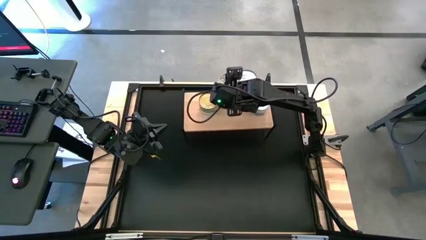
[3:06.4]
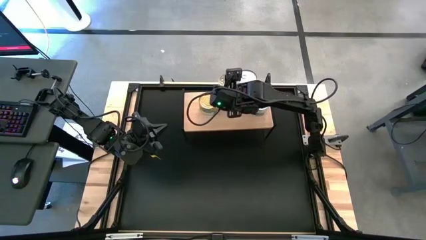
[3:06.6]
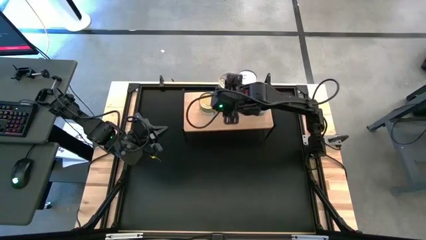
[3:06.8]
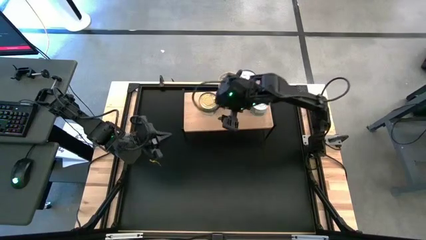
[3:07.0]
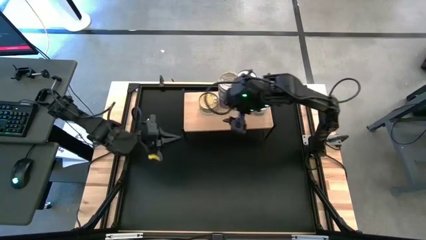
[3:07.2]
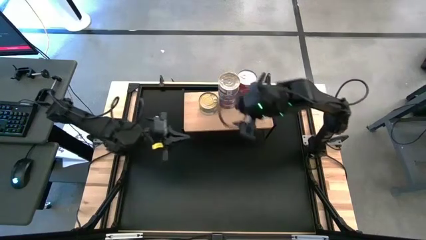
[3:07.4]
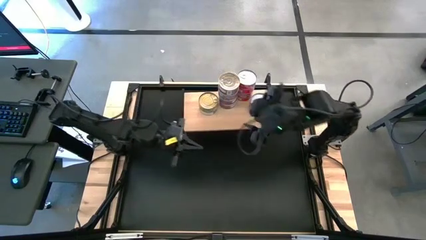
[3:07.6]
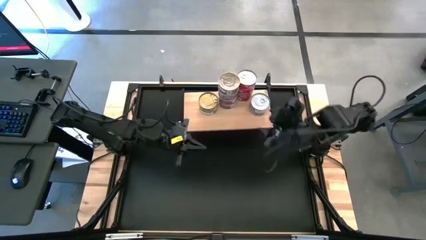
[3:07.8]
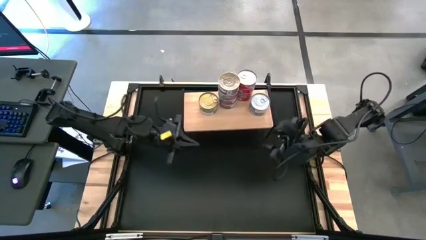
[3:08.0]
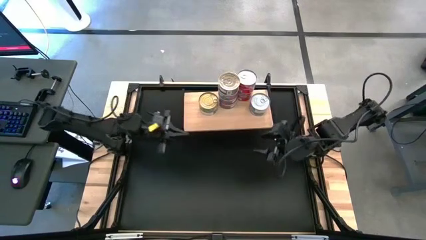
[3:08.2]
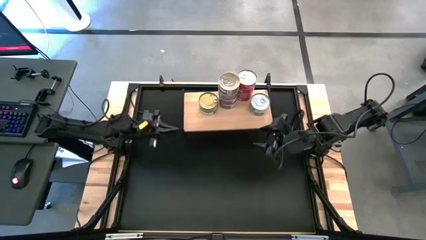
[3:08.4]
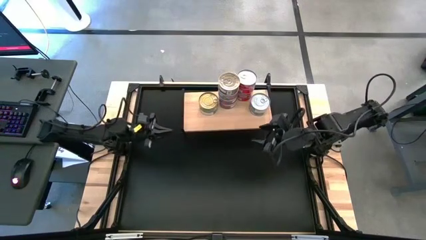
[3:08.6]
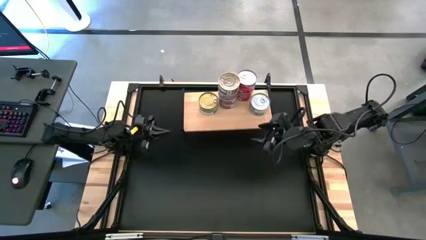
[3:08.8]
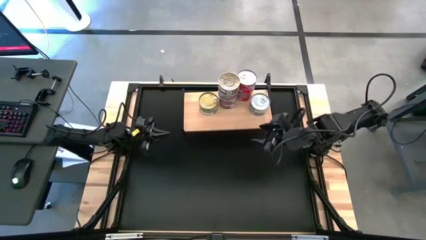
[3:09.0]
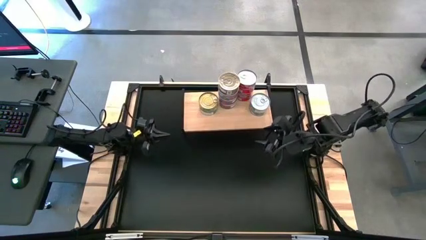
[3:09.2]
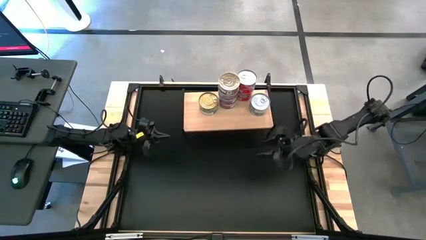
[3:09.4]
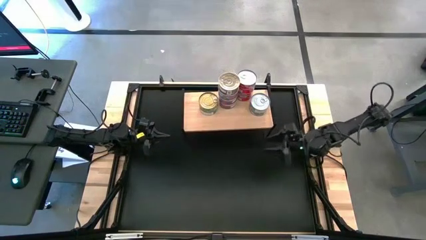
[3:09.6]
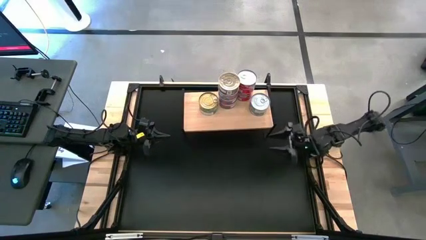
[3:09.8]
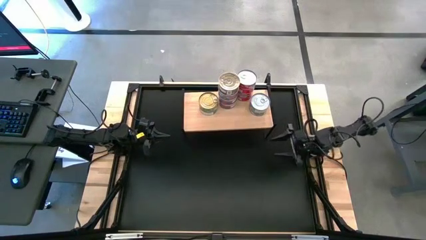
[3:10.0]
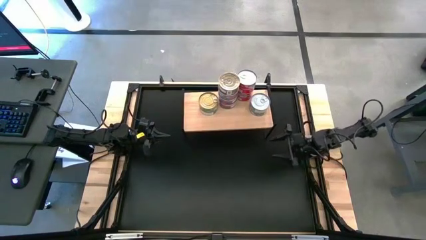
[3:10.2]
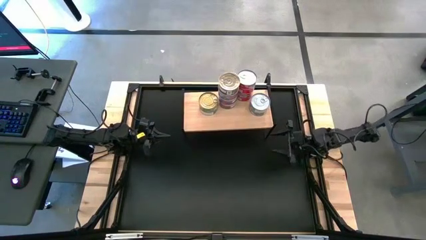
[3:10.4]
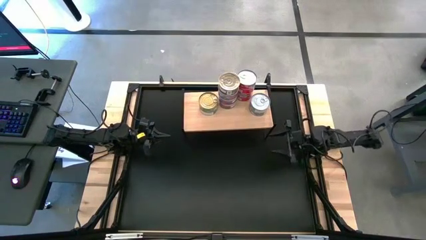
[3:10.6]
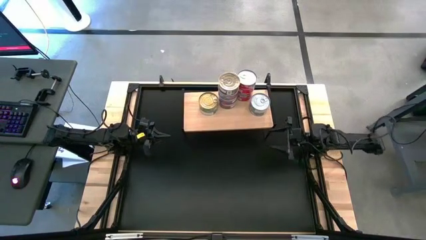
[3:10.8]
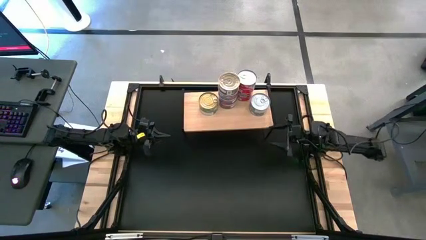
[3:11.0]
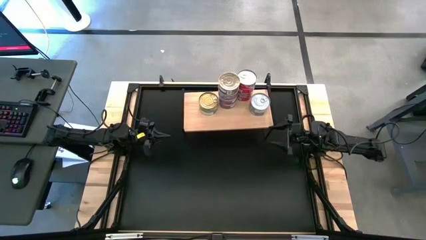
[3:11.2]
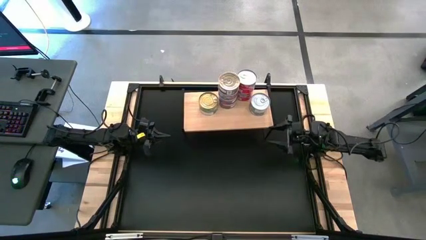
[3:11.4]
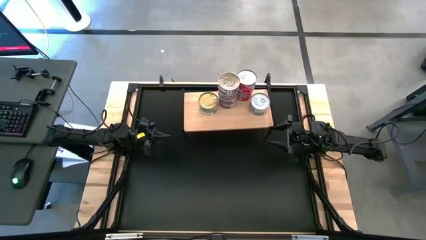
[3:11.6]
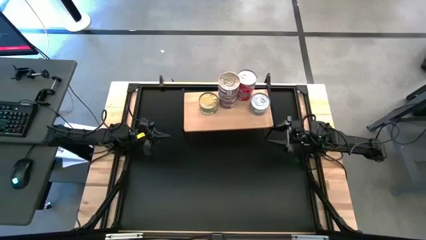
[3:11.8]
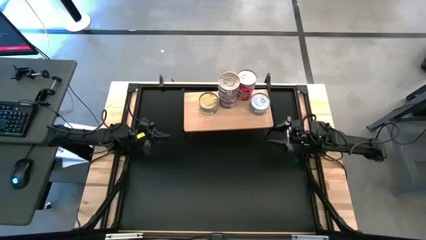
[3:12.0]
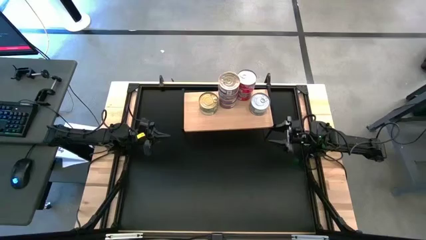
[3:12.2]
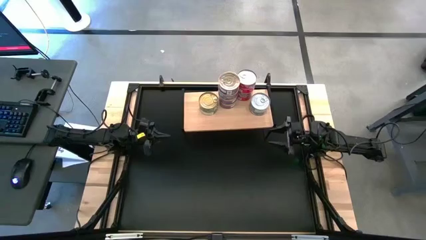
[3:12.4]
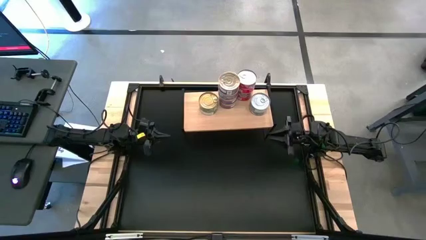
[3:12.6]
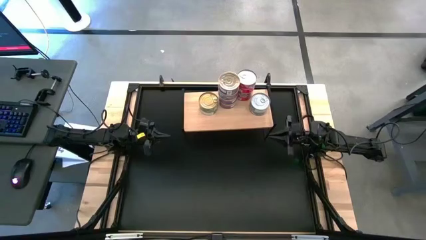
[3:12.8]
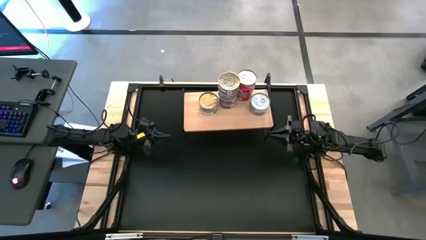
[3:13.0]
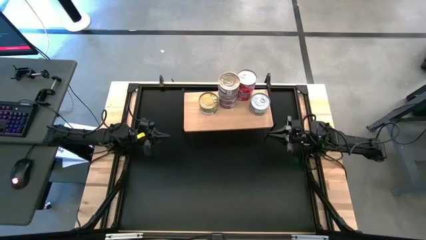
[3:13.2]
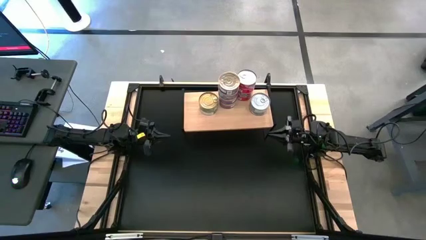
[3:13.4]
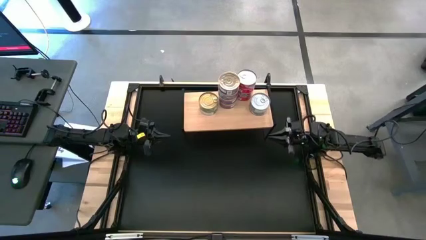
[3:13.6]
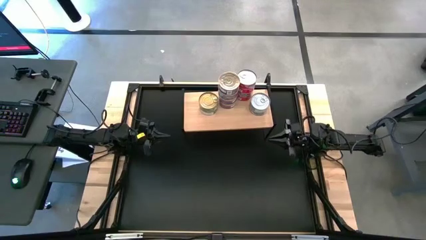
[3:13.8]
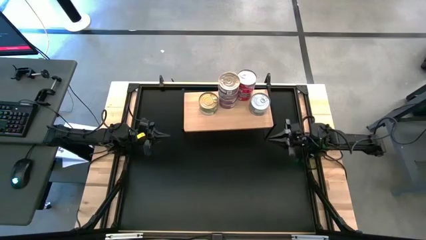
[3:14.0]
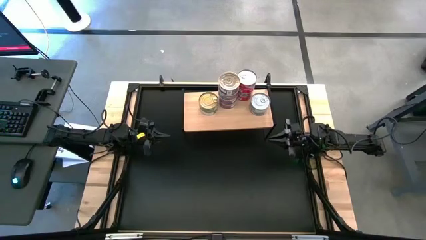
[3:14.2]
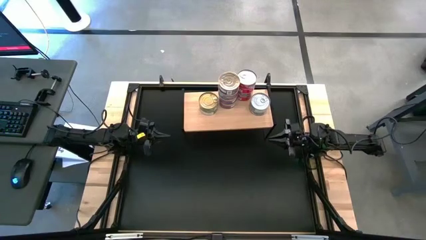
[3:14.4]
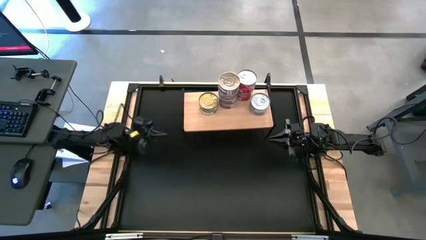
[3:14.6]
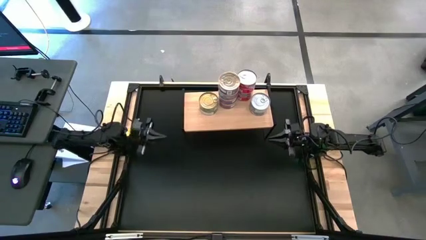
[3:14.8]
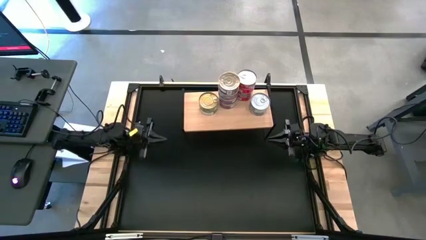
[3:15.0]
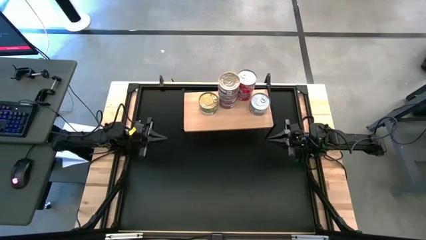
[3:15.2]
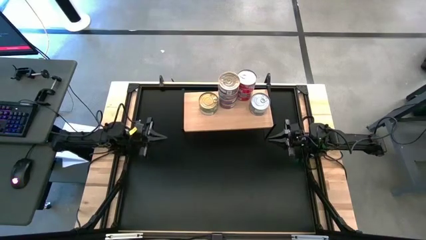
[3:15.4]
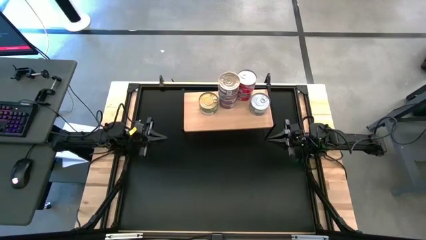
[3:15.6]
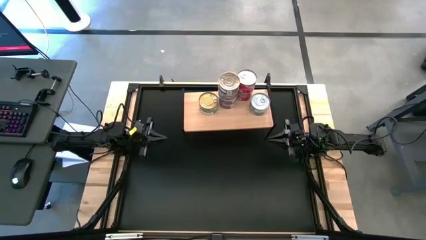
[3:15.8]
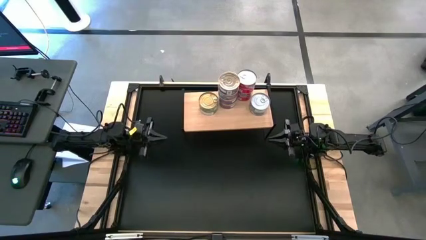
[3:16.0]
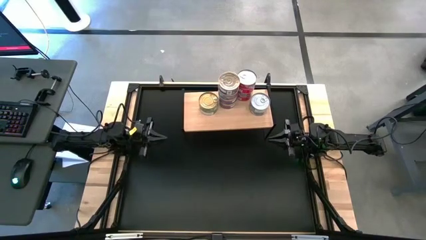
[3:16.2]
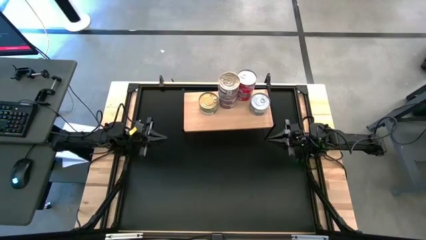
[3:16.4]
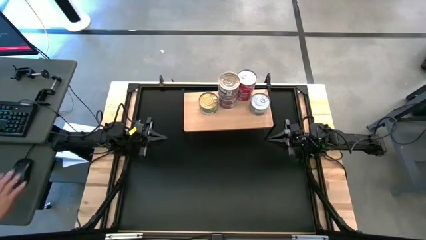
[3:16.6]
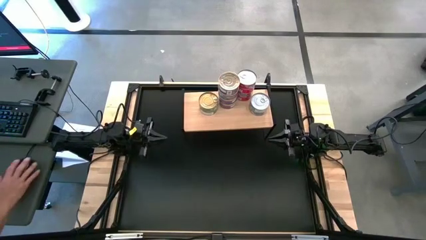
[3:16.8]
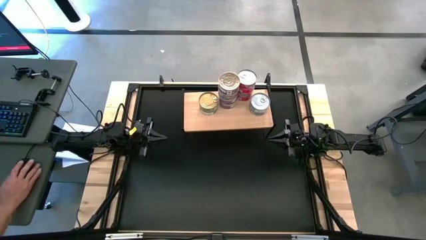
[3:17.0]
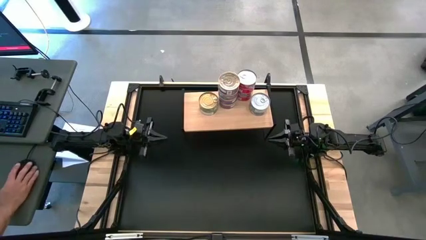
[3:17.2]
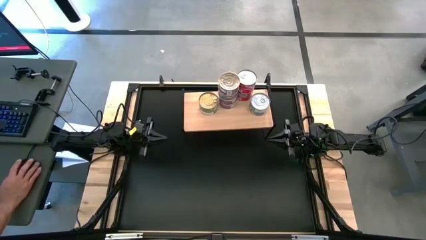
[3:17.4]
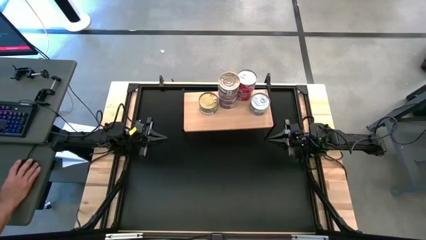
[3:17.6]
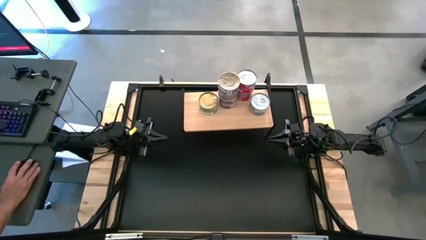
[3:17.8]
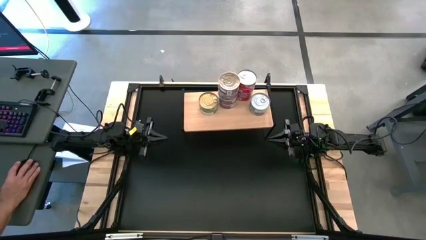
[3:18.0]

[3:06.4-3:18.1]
Task: Stack canned seafood by type on shelf
Return to Home Position
